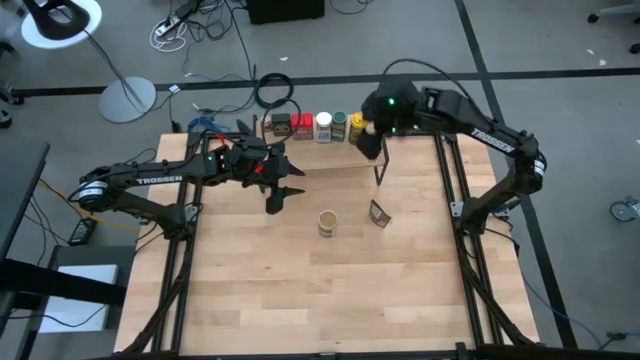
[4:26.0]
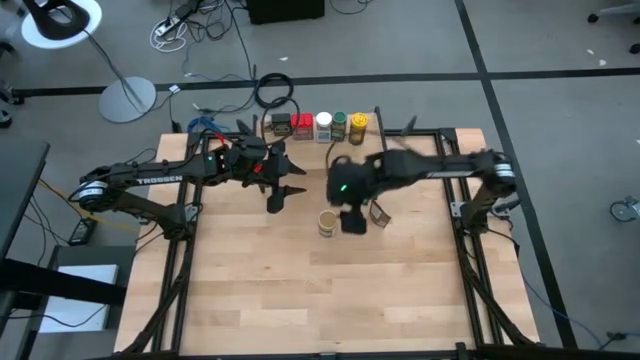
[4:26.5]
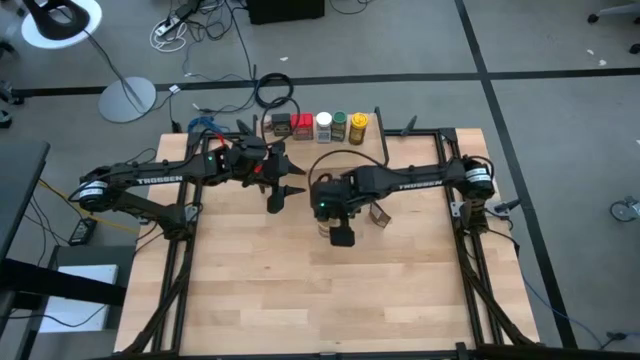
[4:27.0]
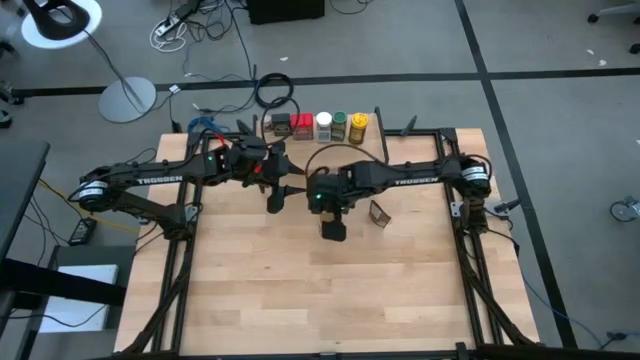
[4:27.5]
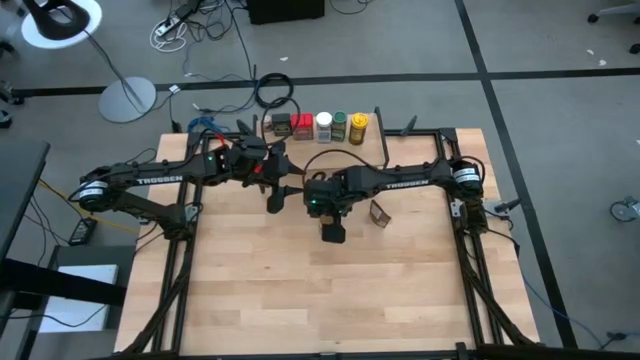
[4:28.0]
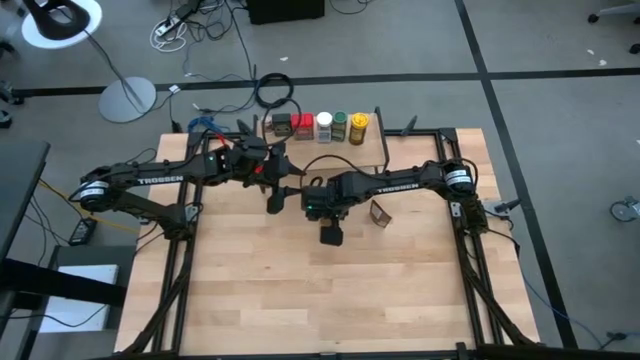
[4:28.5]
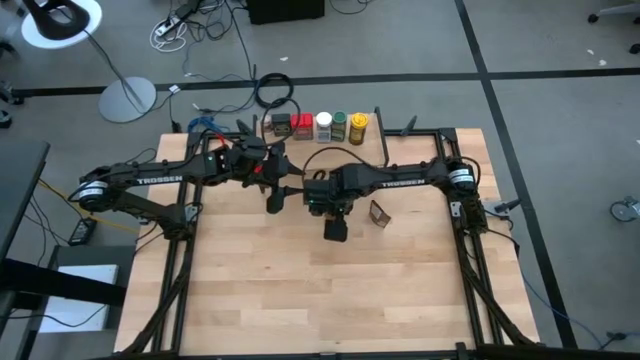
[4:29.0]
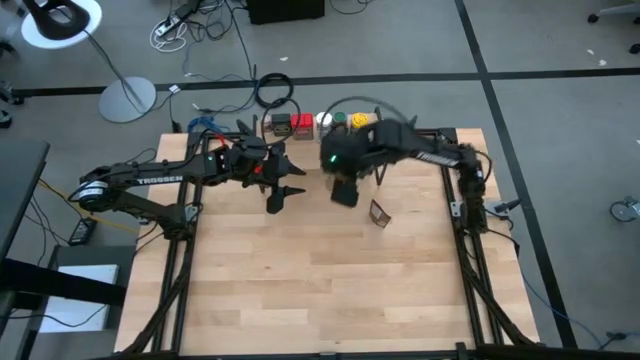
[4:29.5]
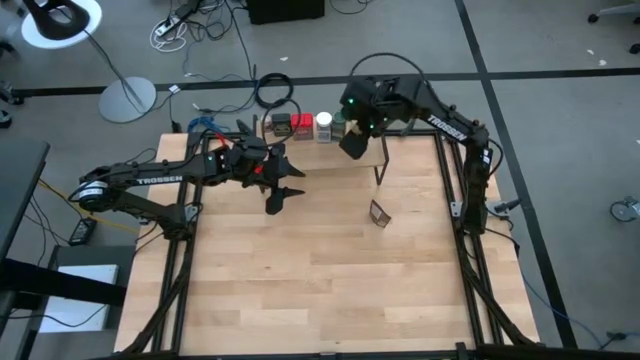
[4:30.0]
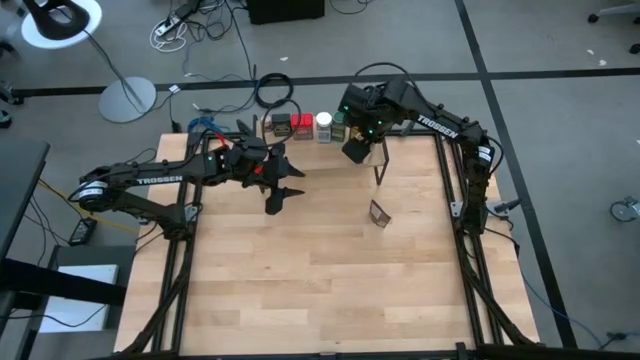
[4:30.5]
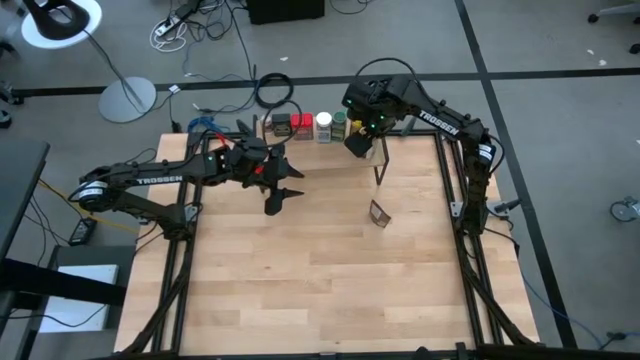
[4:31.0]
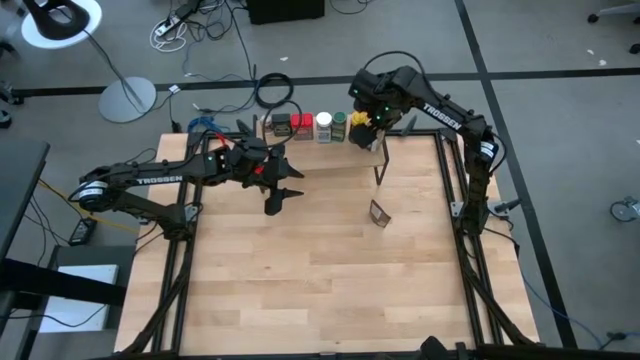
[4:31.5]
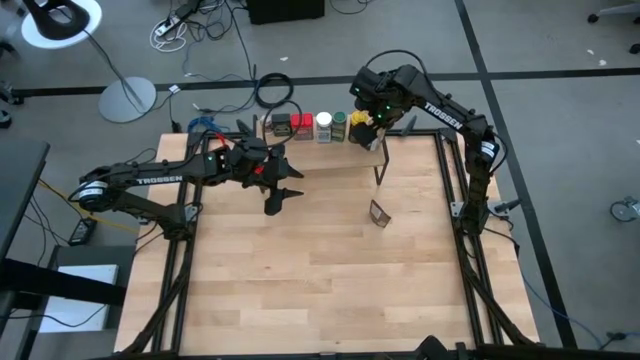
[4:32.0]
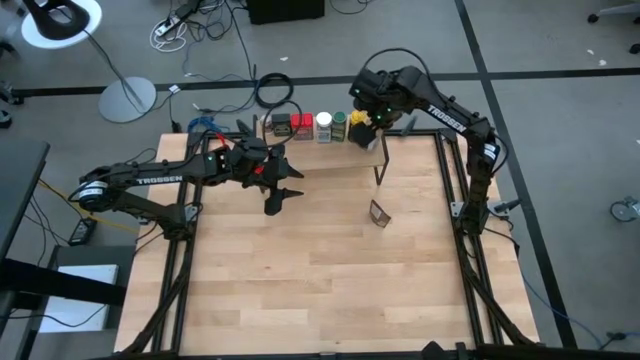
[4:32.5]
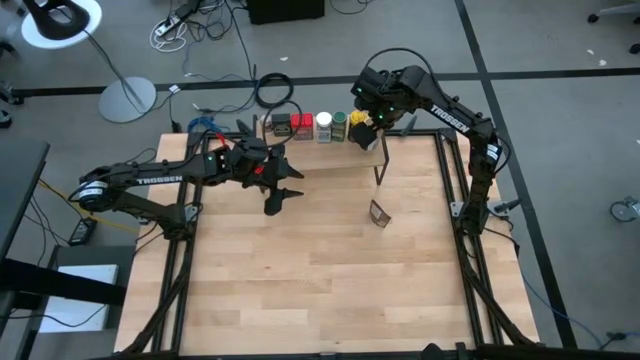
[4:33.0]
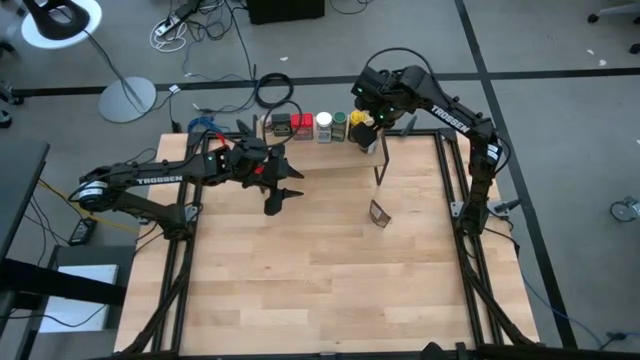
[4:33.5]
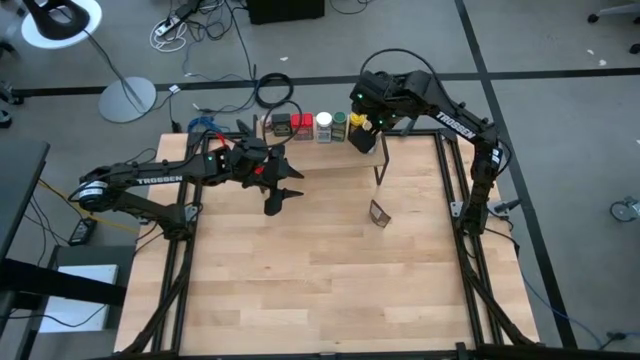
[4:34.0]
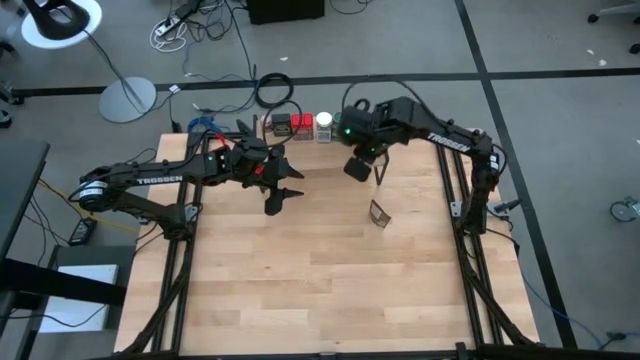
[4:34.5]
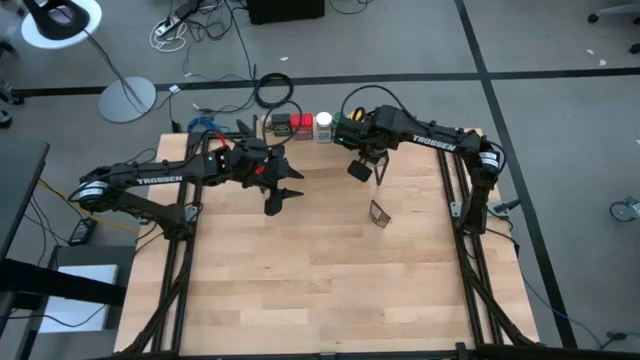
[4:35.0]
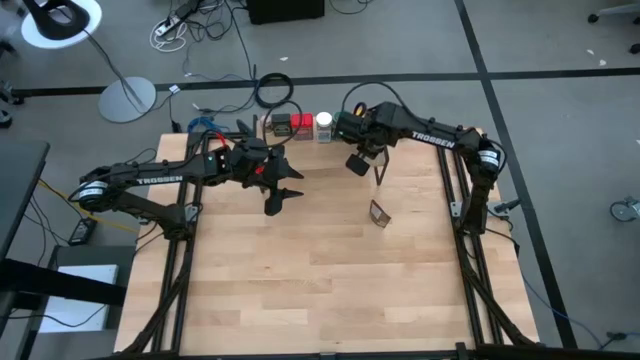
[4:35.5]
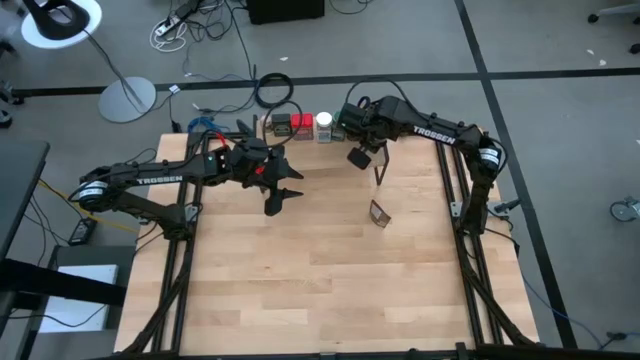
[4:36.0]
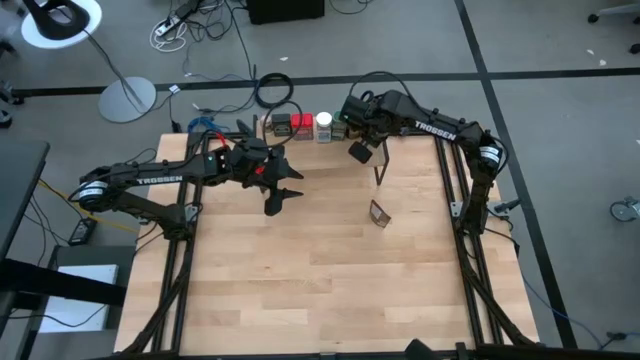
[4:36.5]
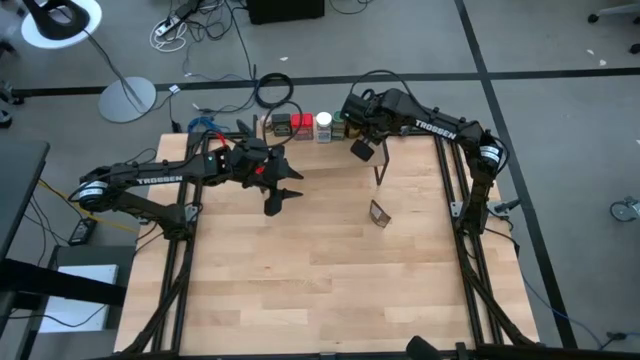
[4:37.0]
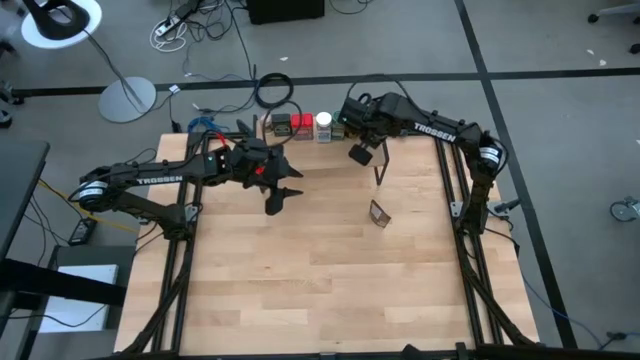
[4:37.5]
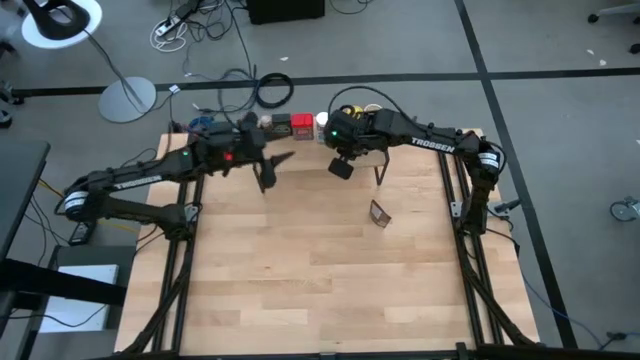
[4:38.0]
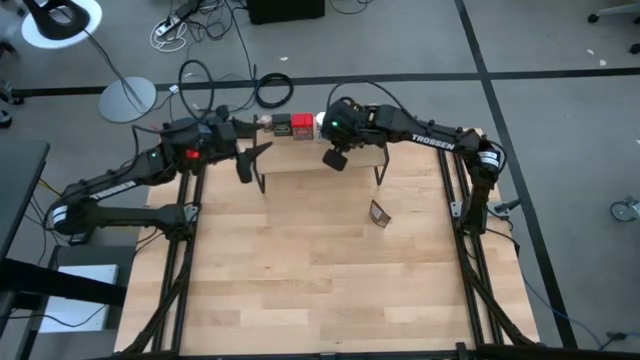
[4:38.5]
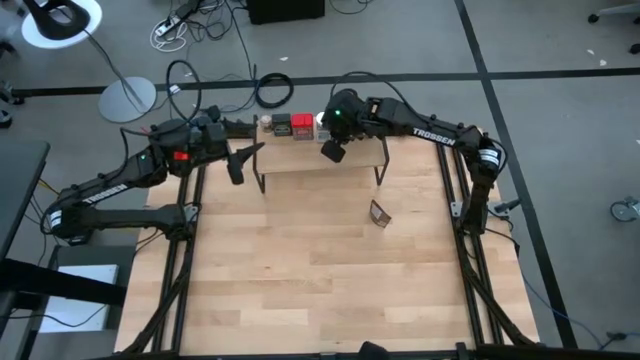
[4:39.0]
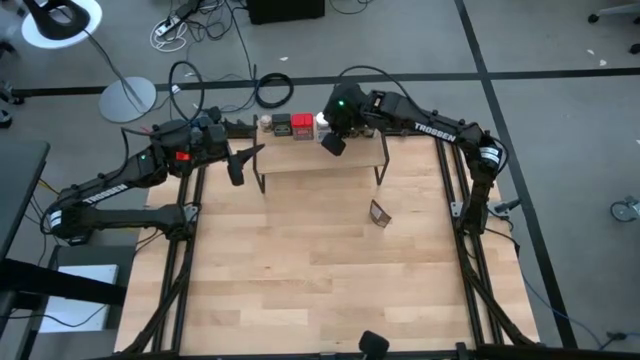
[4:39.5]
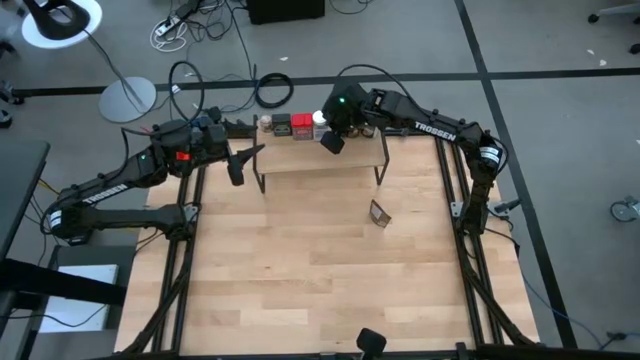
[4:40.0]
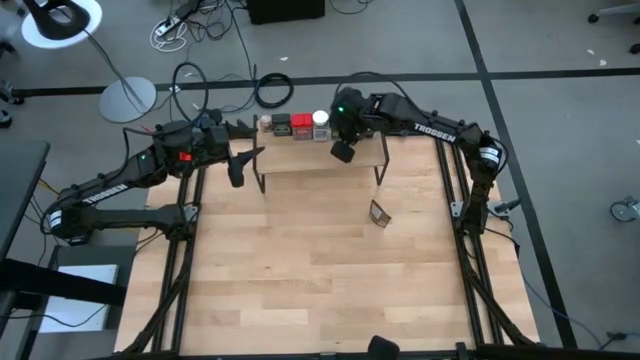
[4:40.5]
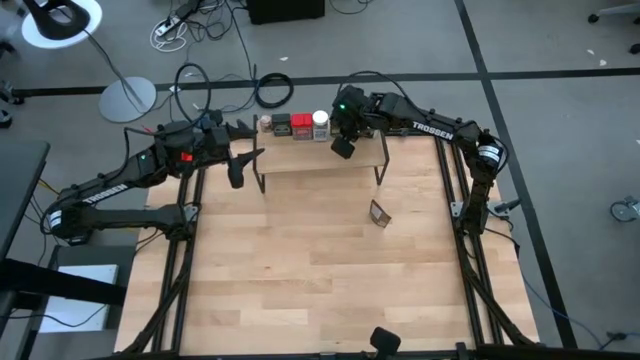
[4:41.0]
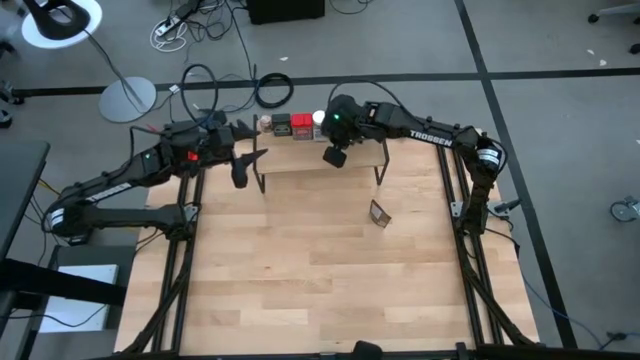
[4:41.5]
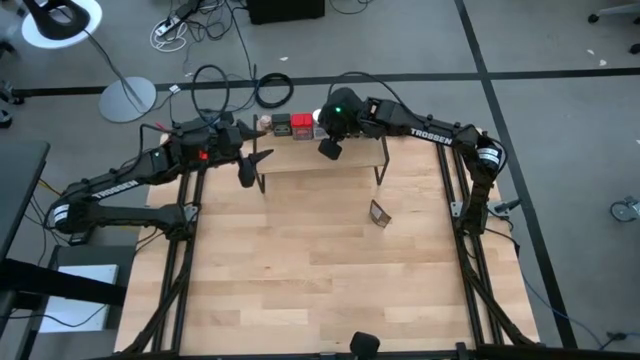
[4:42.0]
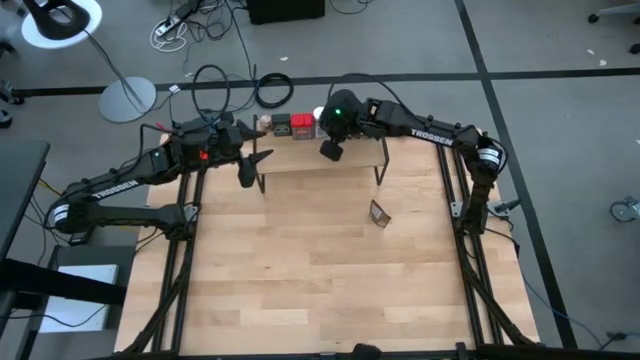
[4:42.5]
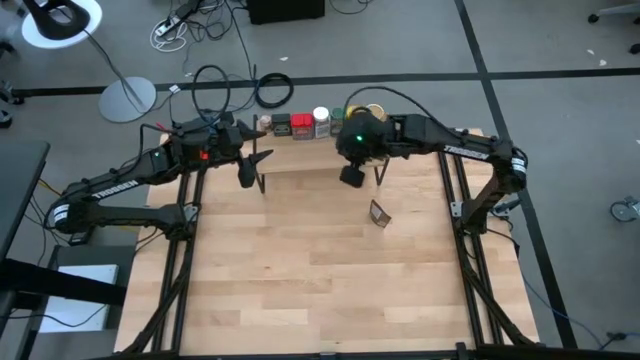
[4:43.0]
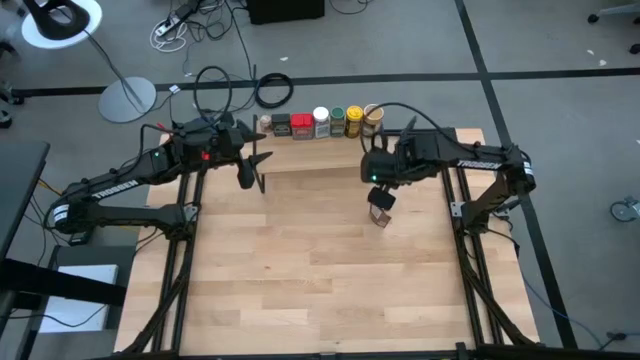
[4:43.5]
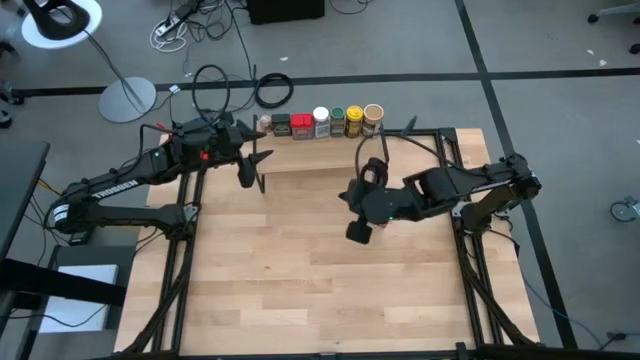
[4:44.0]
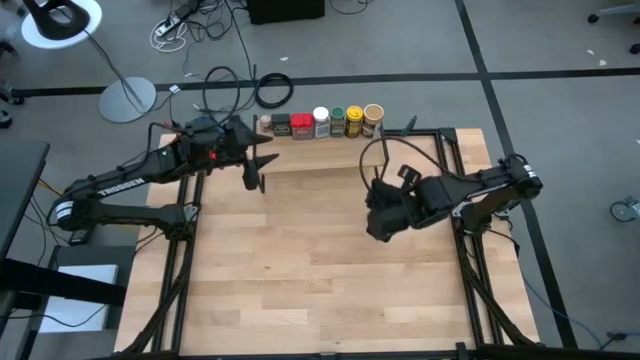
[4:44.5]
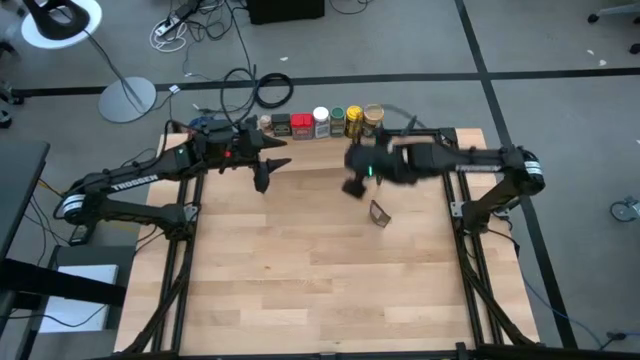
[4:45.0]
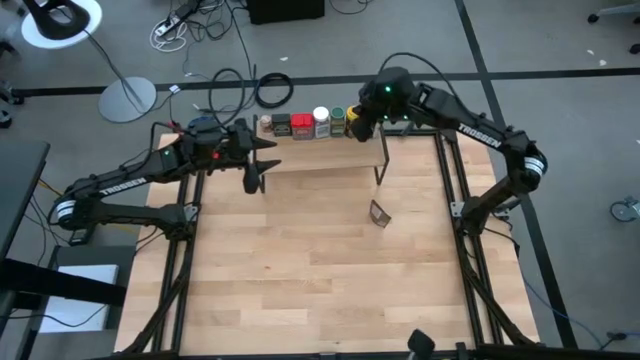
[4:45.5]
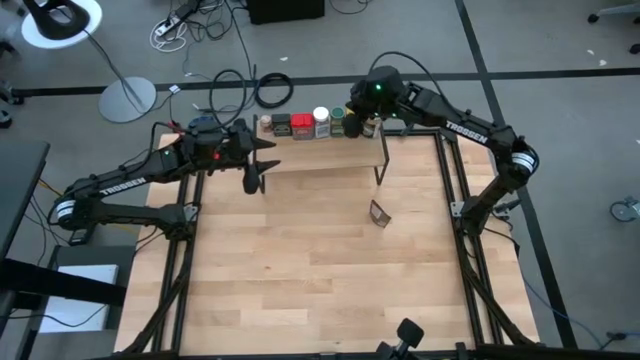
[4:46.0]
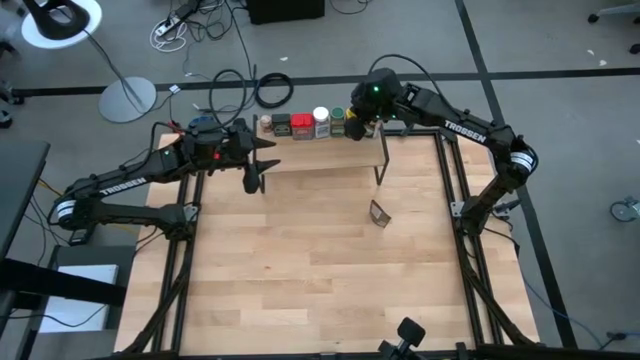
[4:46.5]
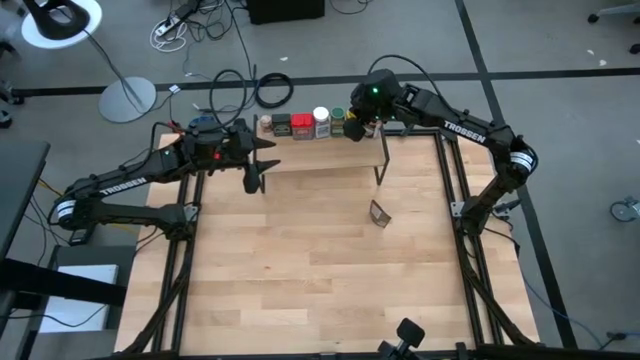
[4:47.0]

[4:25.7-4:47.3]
Task: Shelf spices
Put the brown seasoning bottle on the shelf

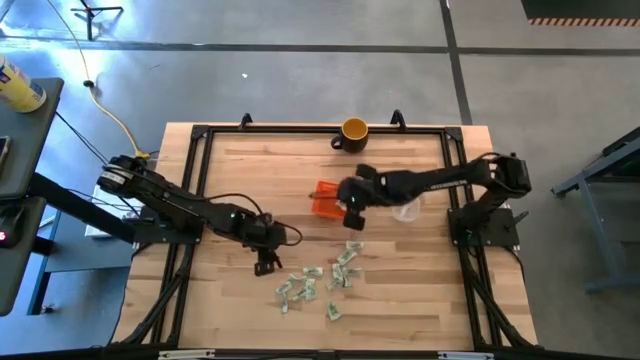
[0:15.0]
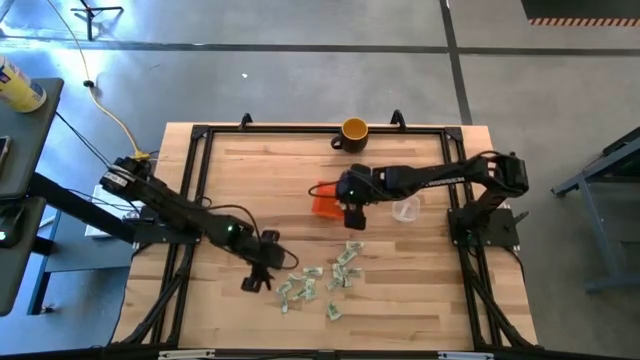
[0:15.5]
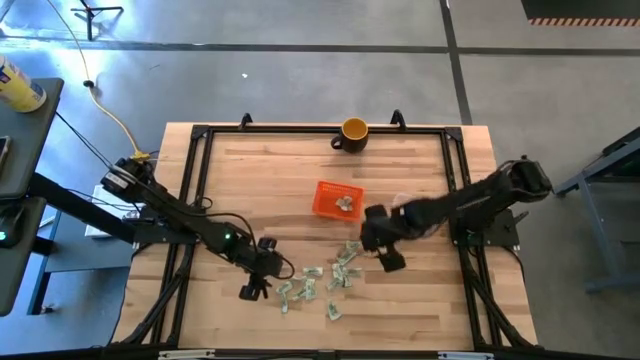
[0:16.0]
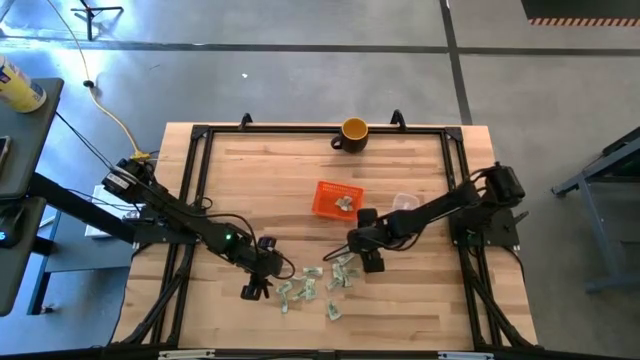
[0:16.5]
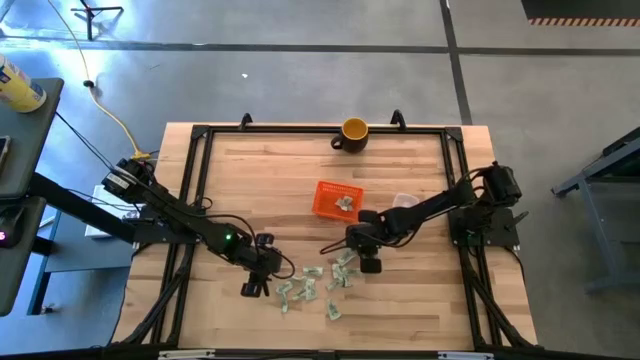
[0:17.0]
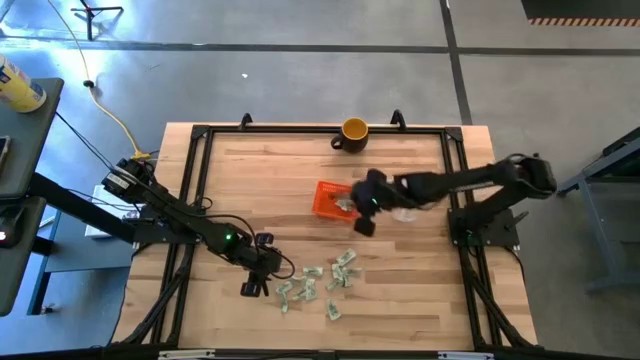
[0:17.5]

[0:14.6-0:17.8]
Task: Pick and place items into bin
Put the white stevia packet into the orange bin
